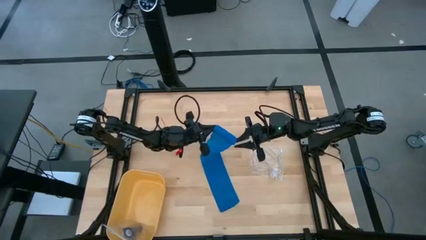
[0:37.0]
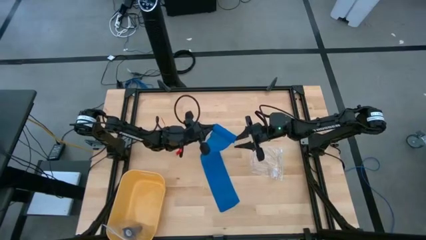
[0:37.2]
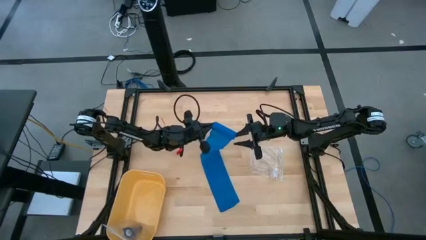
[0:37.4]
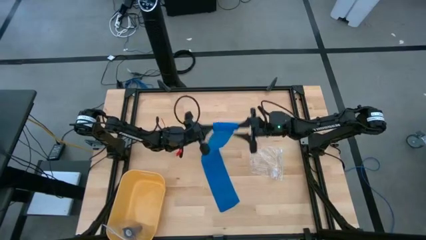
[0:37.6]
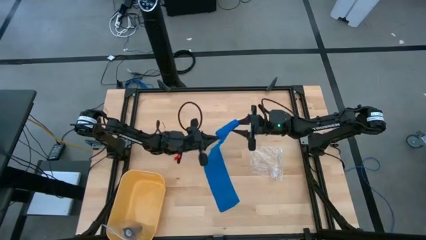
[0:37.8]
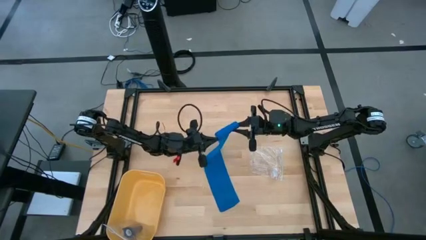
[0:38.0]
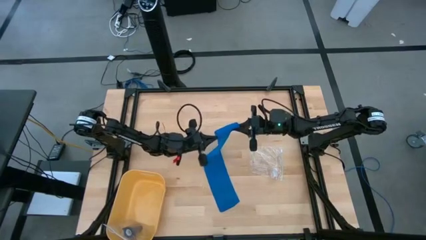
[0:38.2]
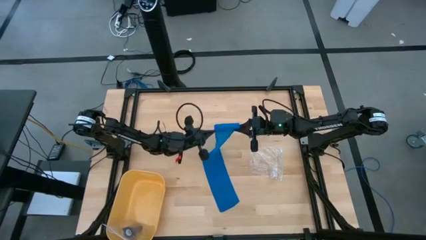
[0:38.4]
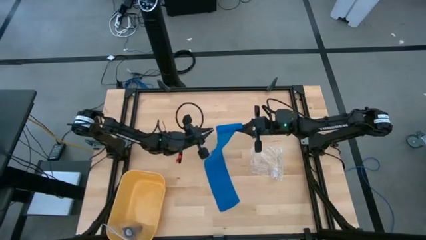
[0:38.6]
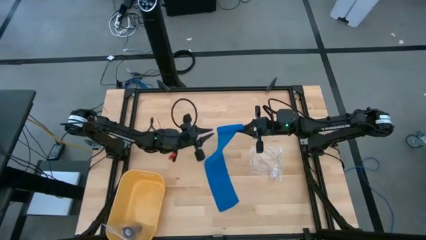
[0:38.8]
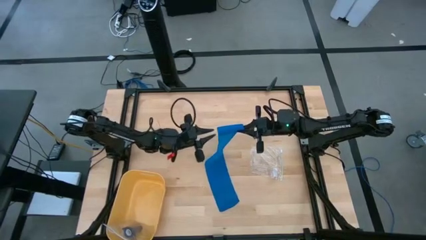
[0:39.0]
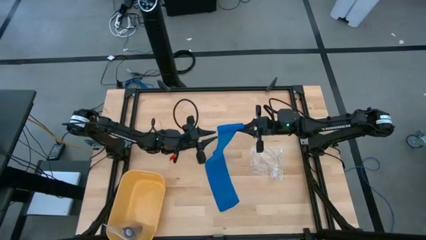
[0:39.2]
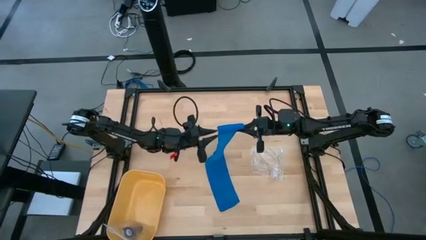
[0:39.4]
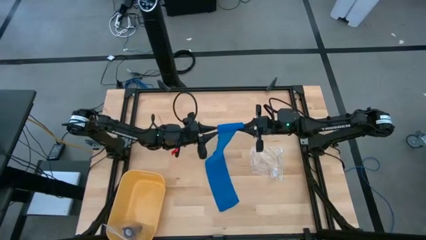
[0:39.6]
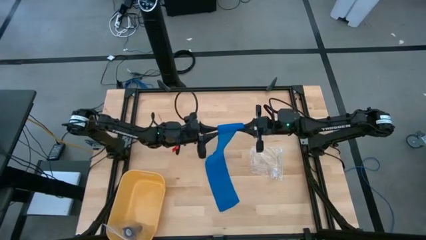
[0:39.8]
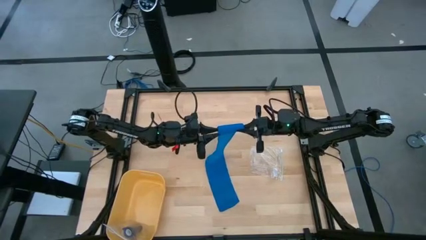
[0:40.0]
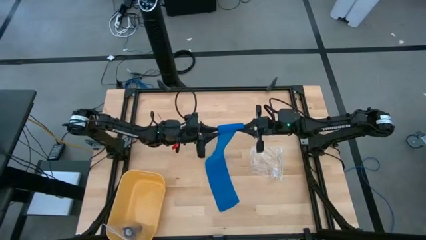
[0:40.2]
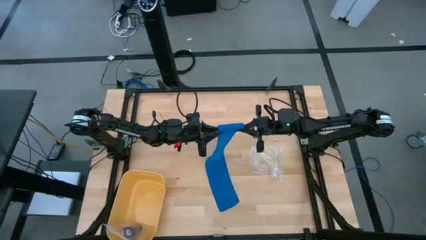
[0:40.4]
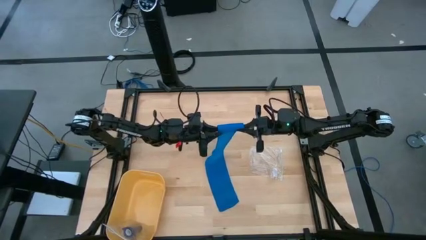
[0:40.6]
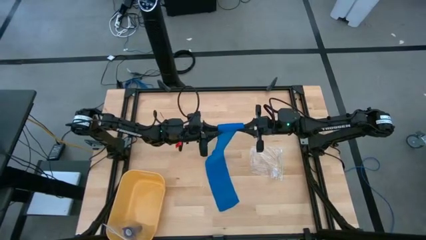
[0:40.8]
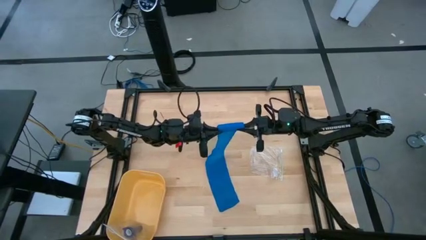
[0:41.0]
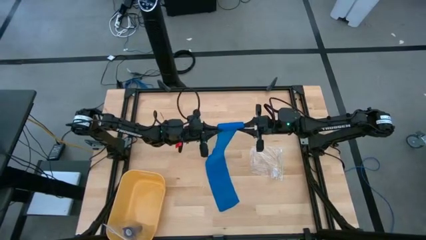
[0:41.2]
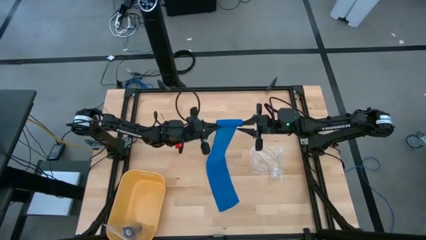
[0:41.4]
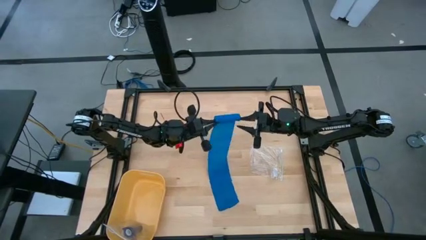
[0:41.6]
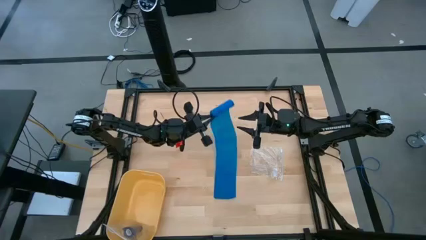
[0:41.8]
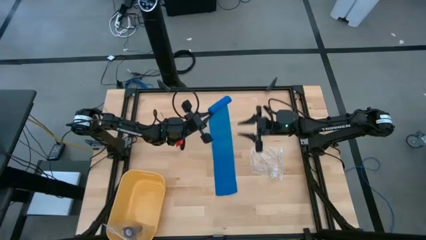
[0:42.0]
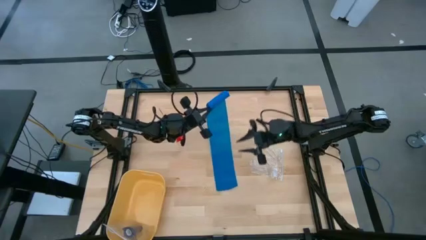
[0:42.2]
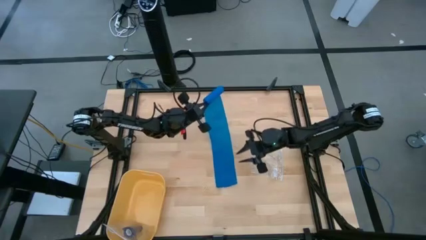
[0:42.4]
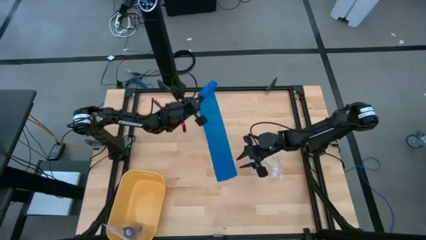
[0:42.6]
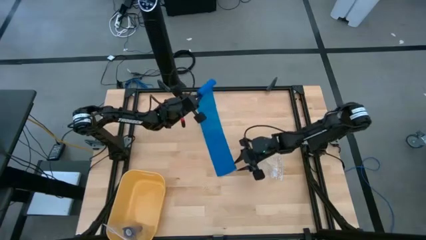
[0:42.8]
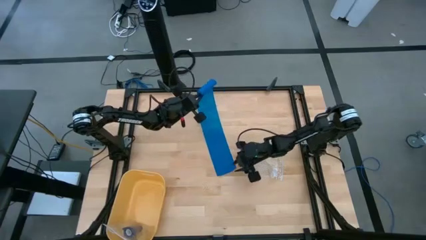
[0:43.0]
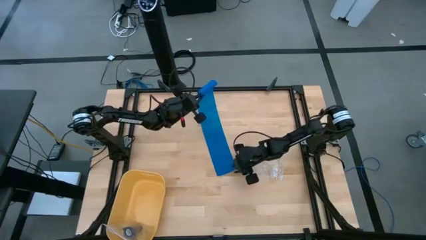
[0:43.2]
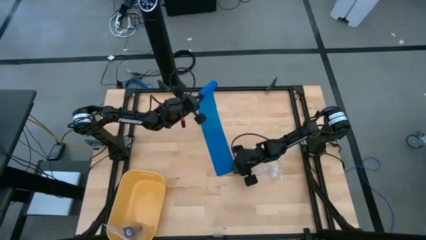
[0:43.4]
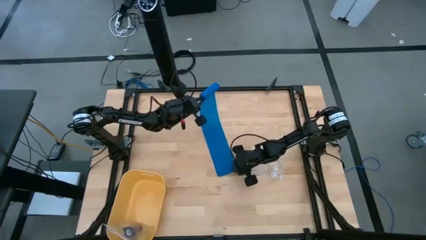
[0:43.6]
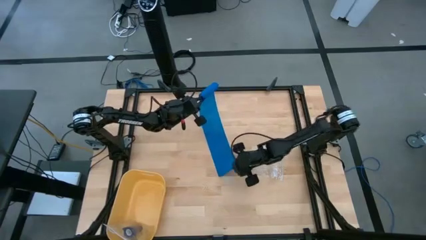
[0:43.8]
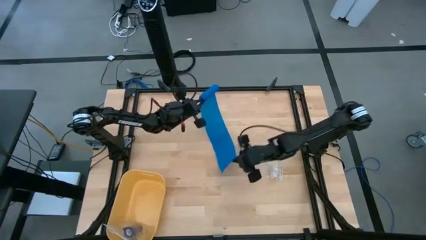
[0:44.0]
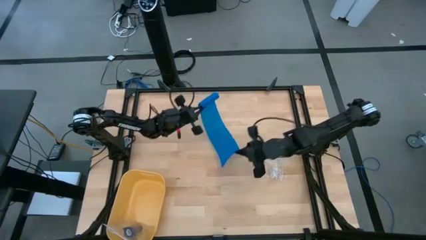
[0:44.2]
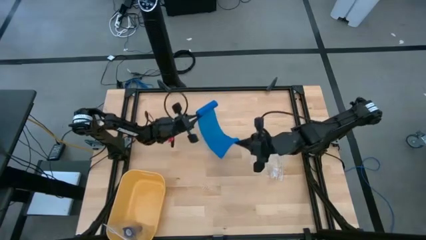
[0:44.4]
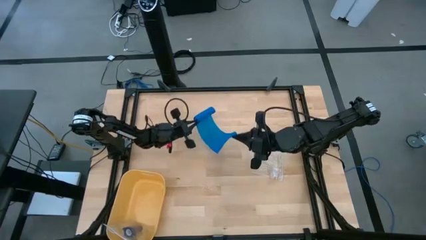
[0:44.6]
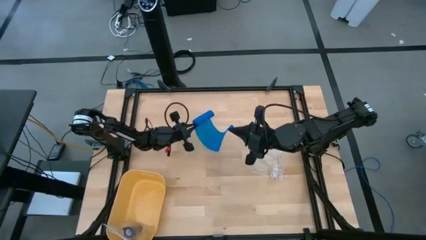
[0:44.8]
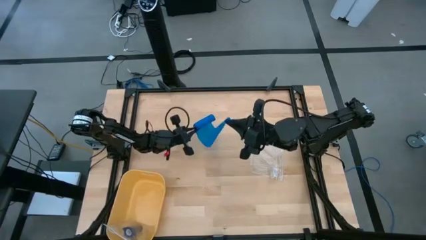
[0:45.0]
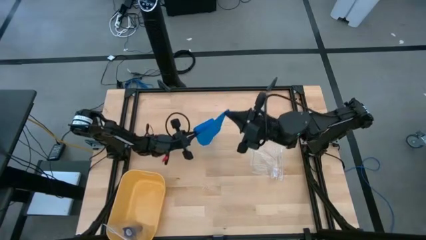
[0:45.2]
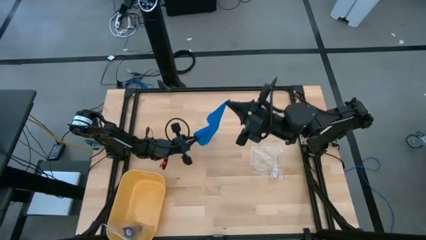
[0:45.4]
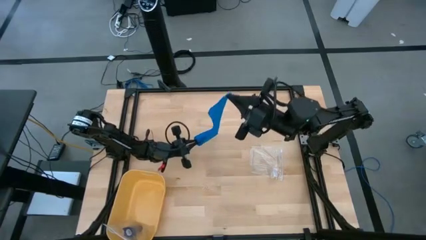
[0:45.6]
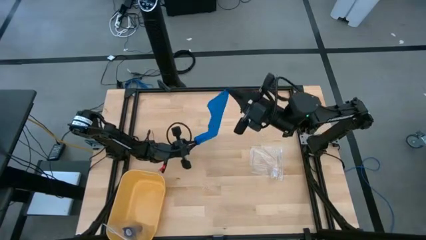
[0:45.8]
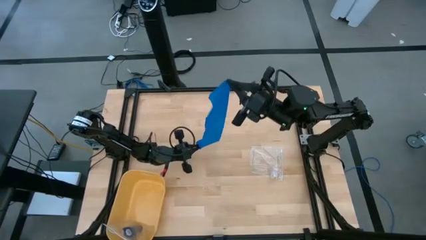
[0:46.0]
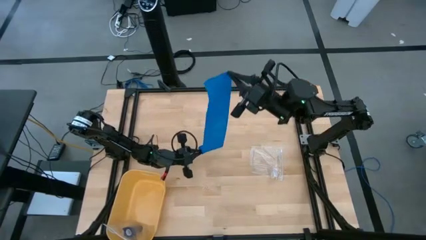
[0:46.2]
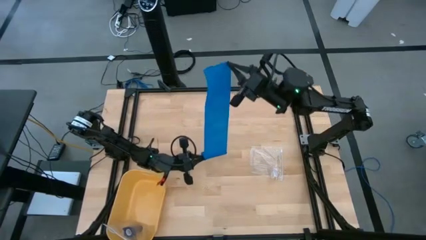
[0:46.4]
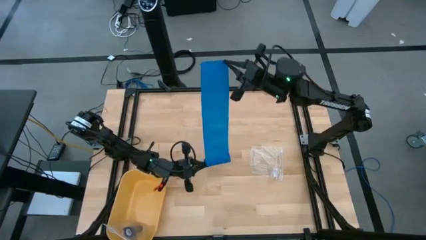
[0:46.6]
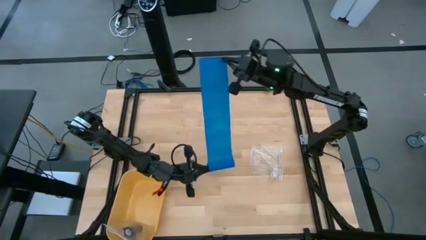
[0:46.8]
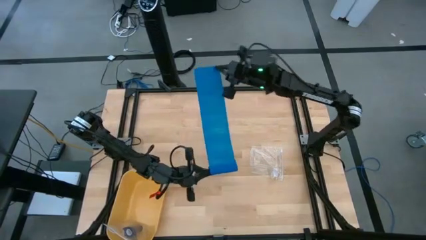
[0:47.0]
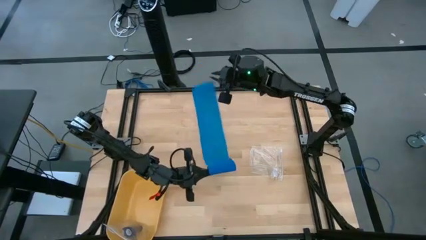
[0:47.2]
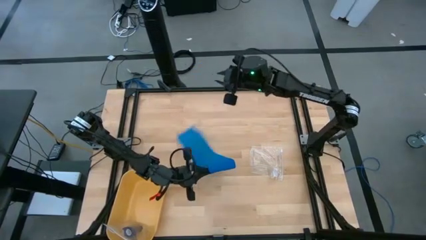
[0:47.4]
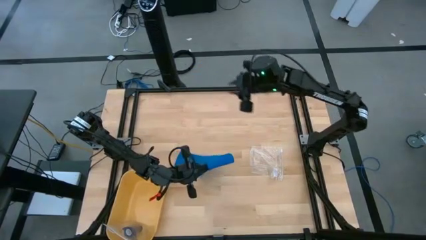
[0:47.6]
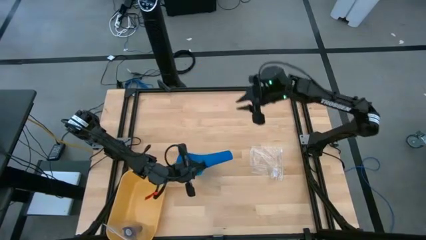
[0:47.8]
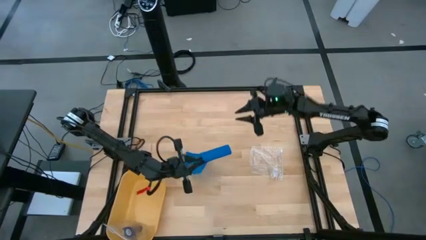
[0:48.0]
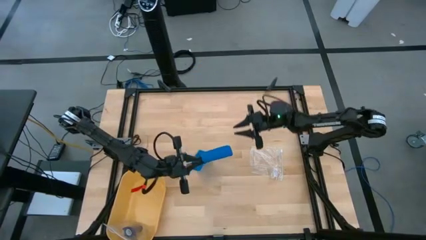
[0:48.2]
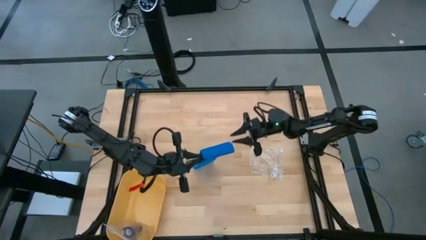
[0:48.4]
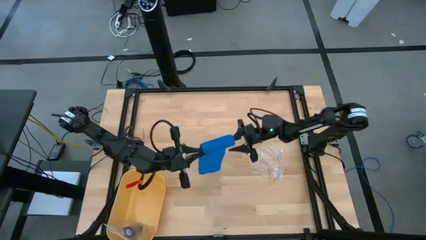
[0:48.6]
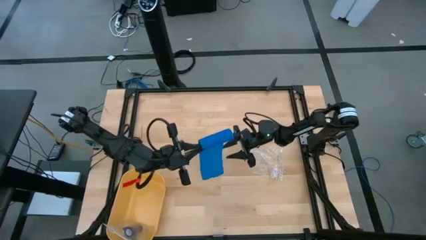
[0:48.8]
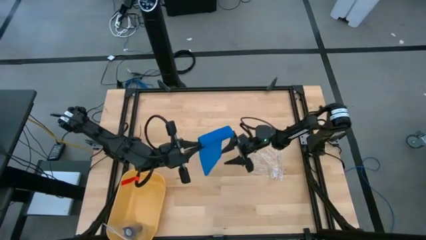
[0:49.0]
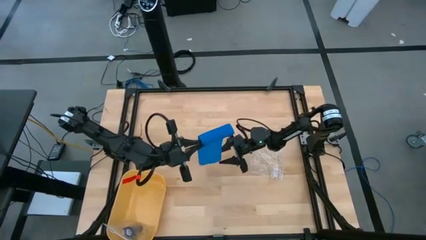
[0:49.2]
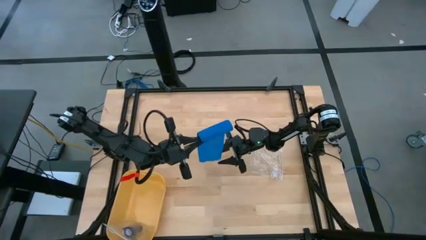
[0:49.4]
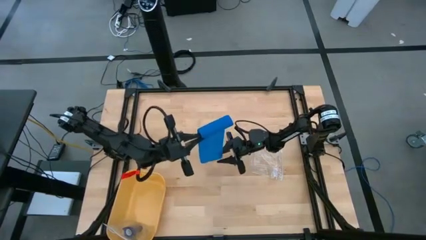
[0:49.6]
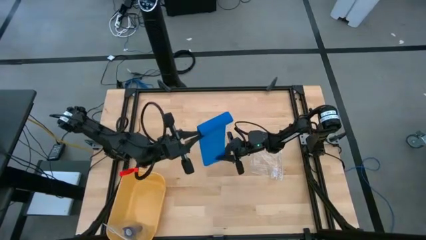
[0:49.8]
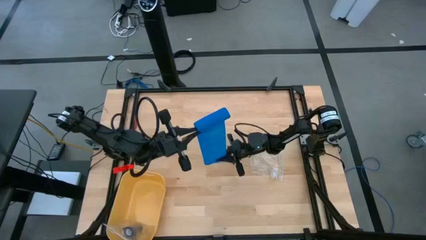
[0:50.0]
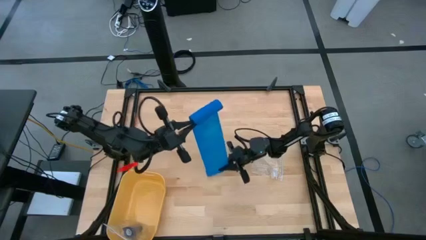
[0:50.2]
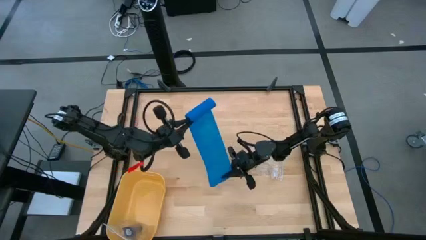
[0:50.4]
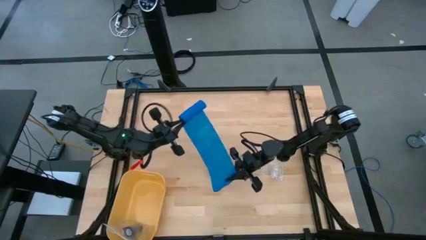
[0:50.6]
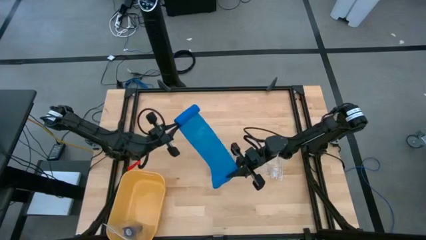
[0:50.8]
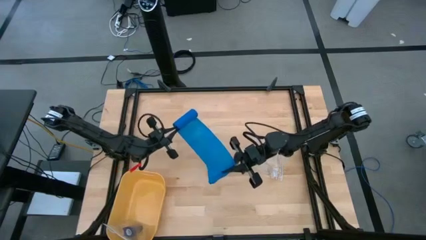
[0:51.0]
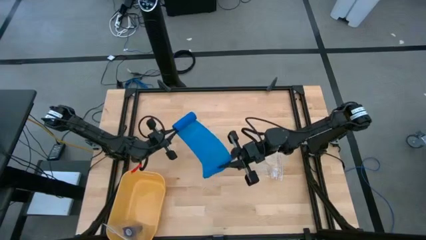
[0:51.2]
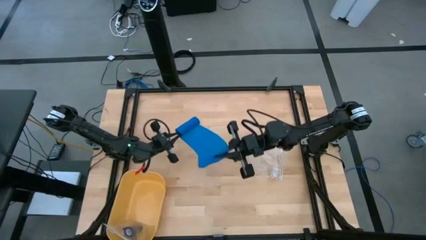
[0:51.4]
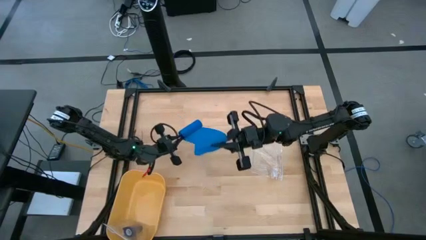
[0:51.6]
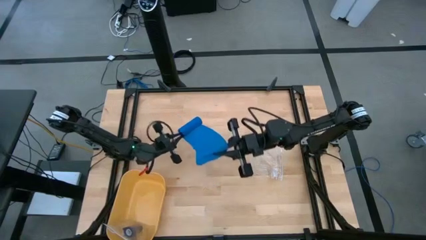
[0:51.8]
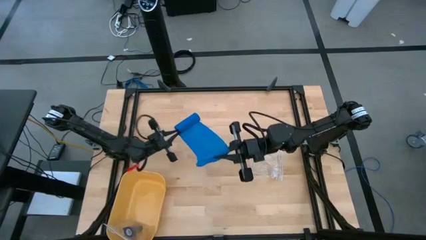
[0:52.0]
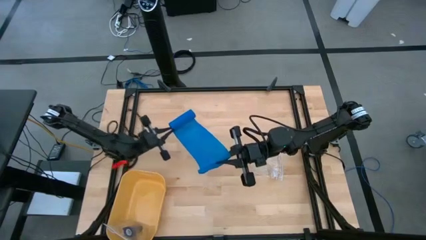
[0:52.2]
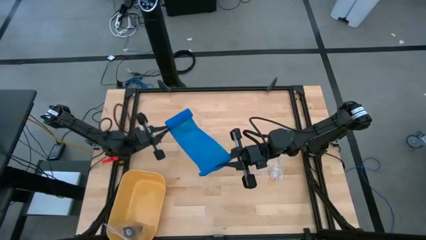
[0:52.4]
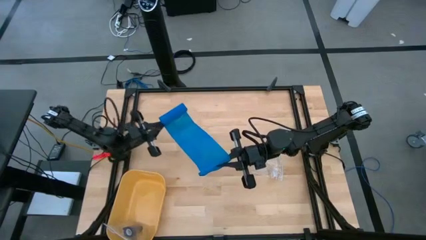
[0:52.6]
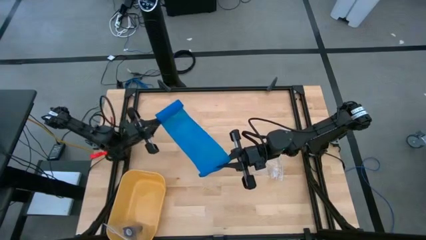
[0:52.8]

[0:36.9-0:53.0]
Task: Roll bandage
Roll the blue bandage
